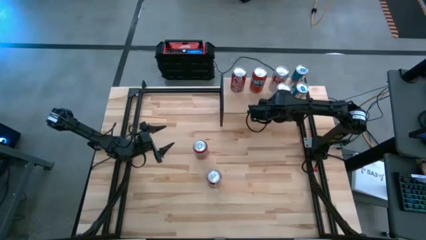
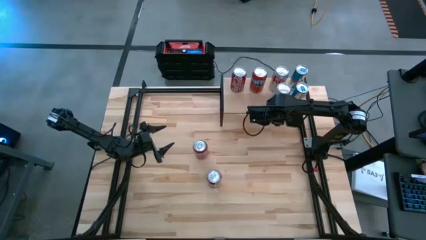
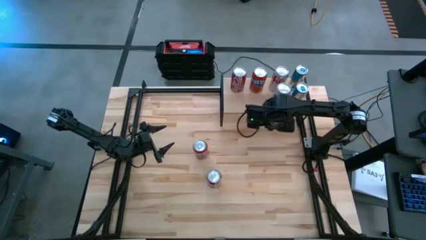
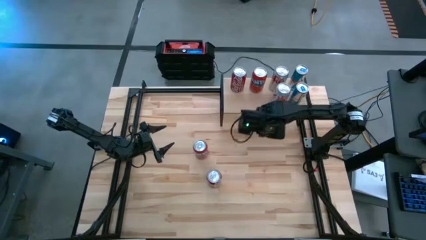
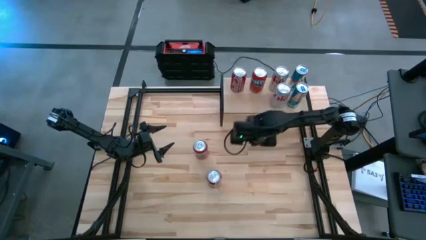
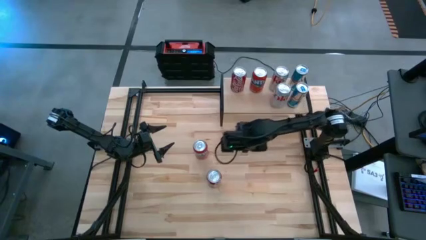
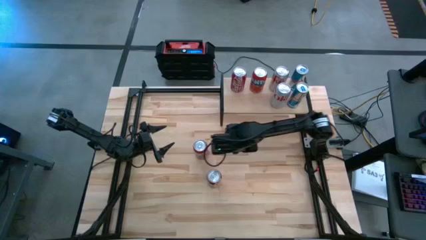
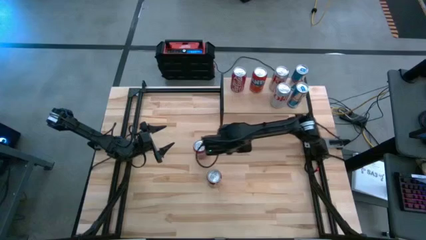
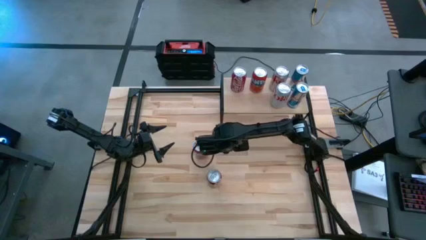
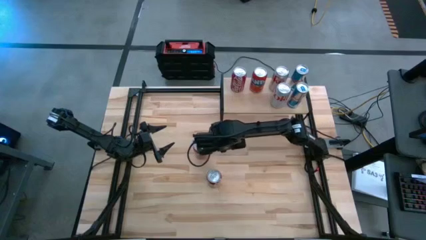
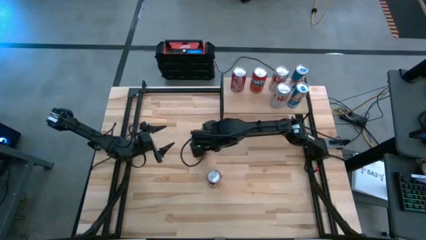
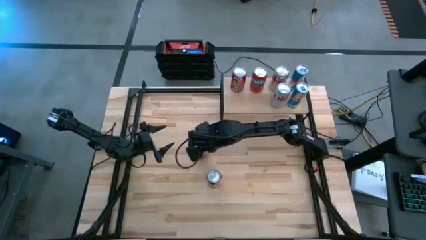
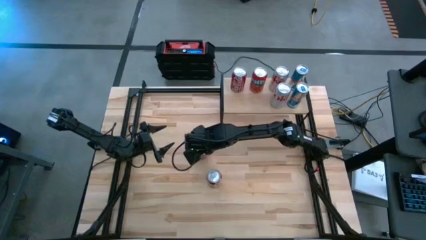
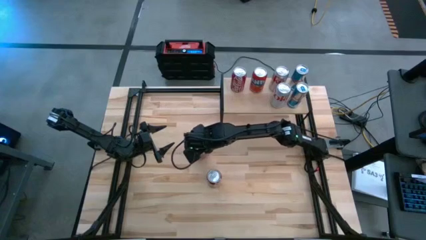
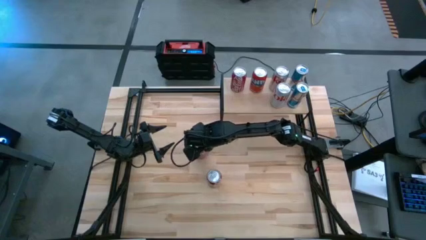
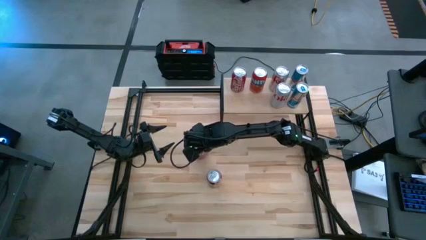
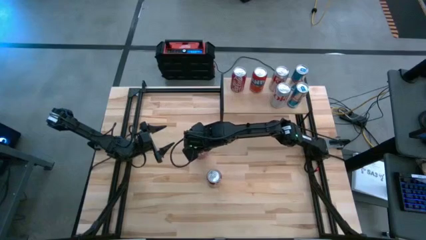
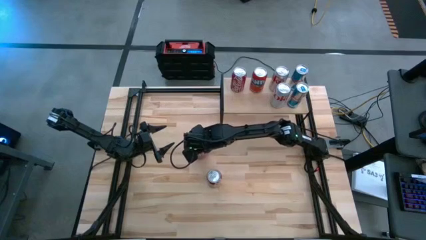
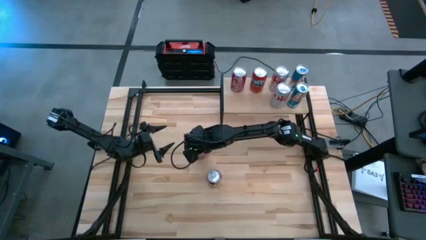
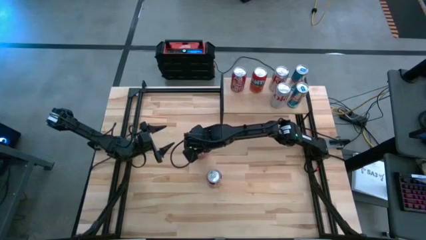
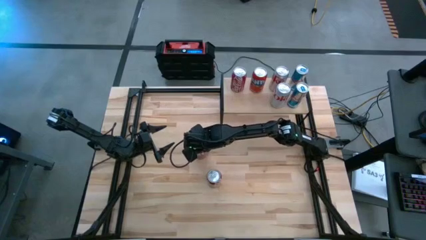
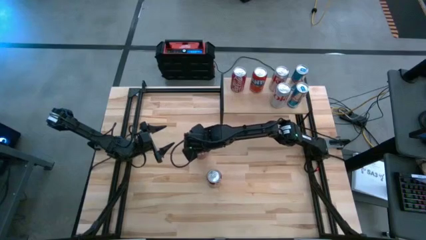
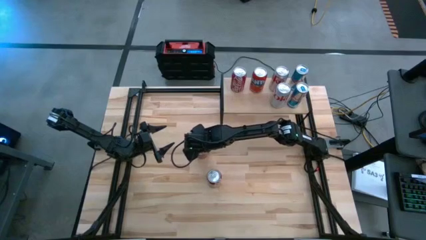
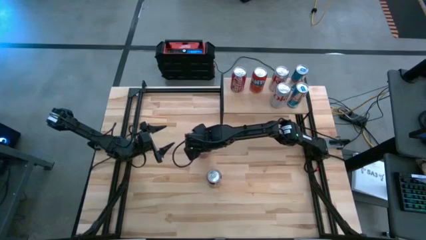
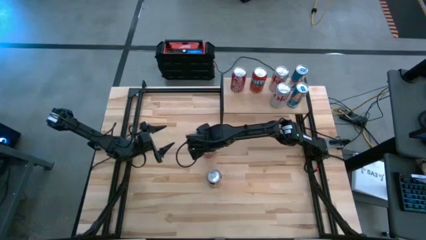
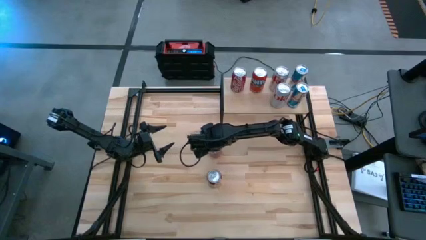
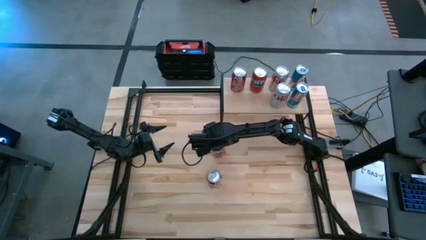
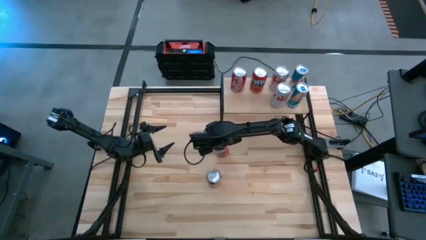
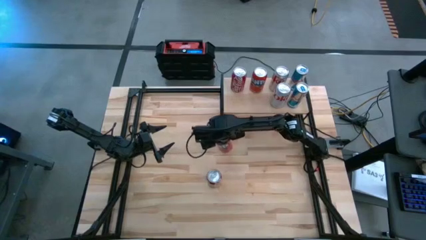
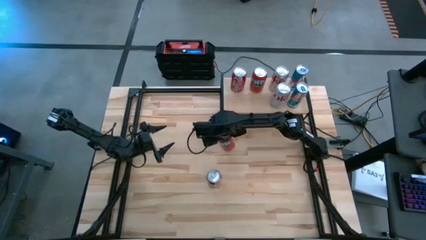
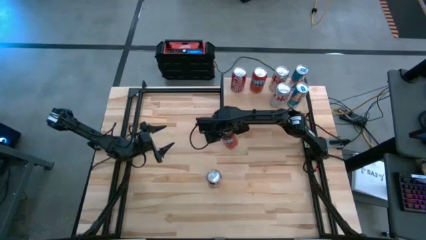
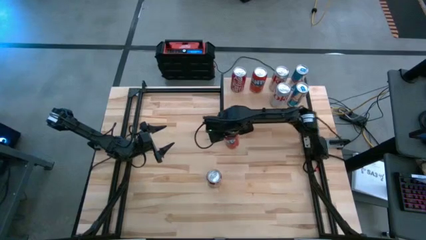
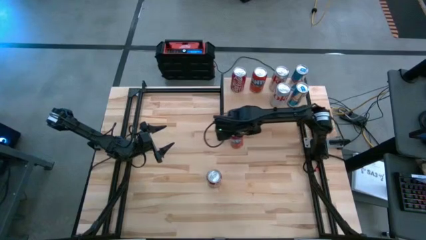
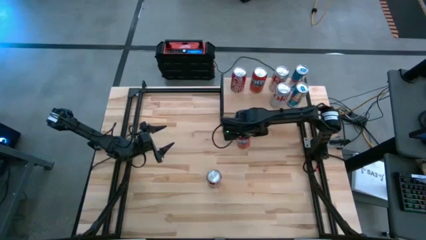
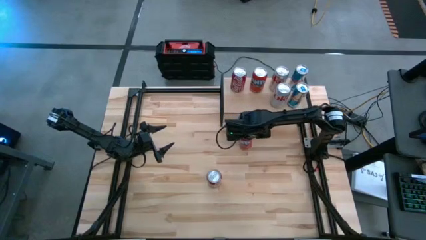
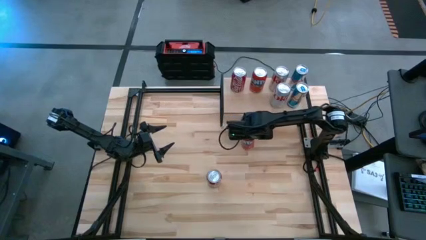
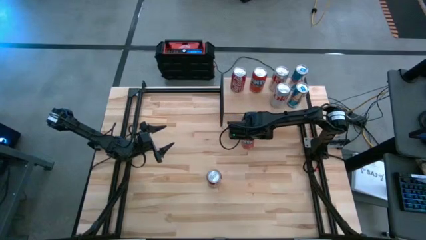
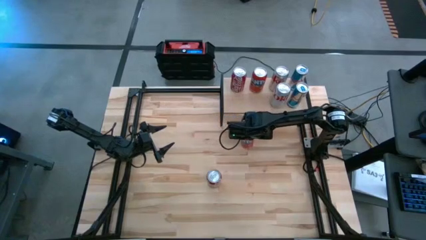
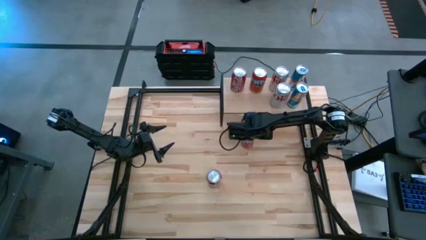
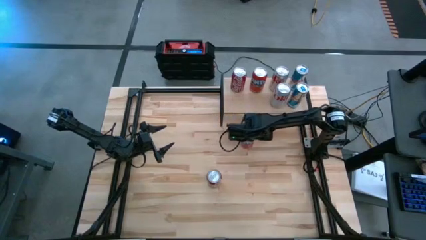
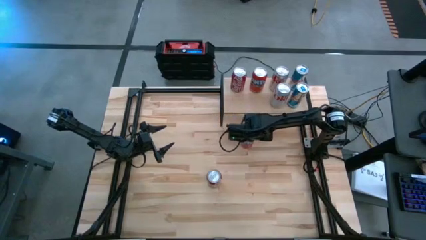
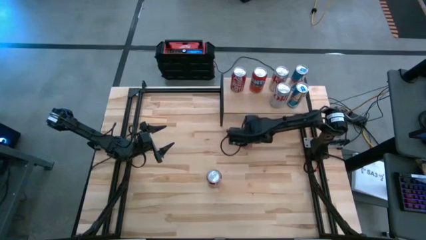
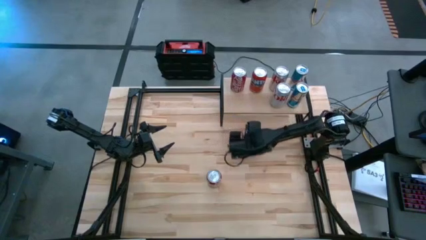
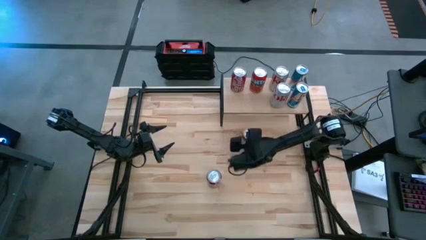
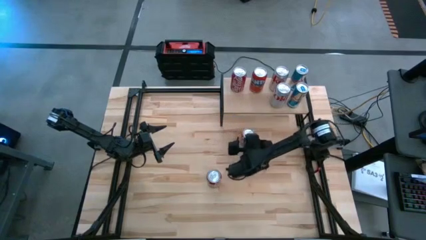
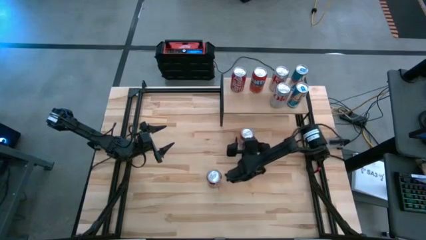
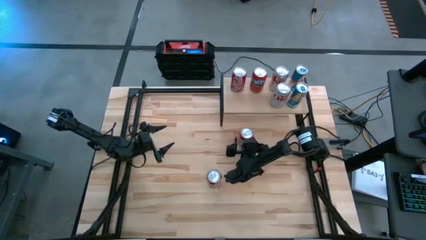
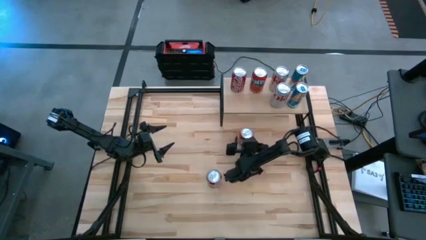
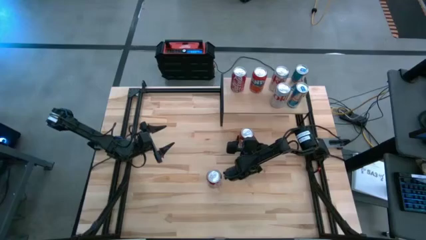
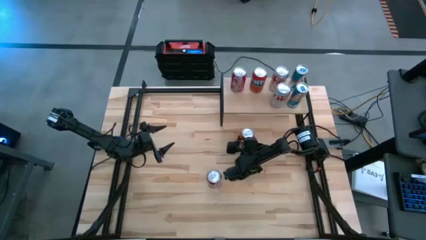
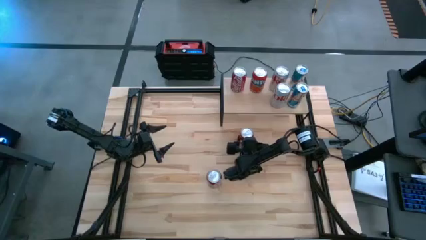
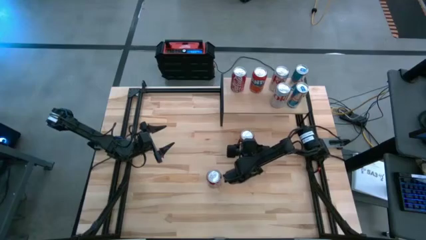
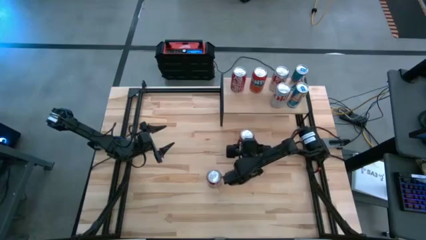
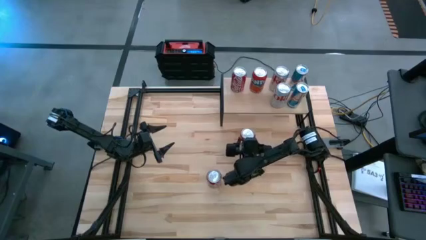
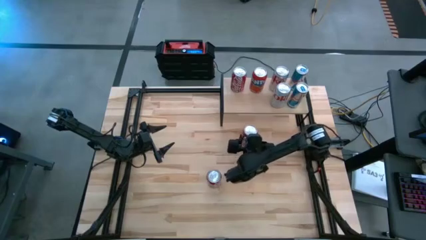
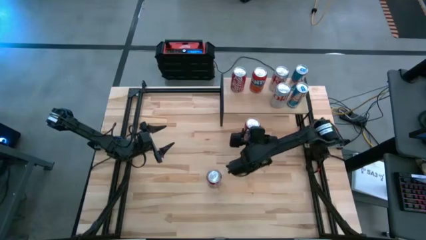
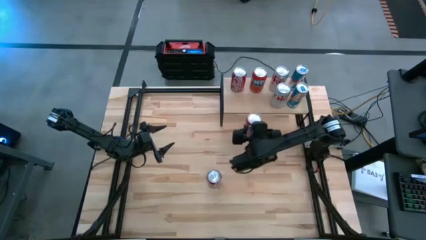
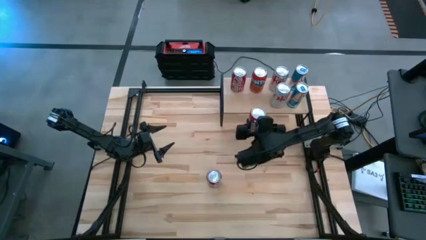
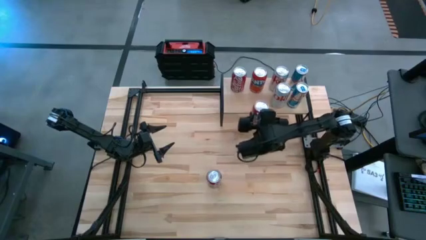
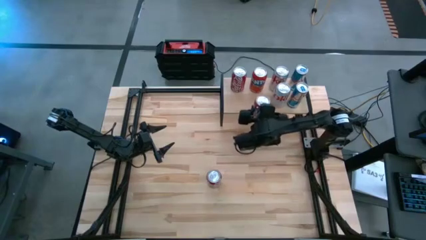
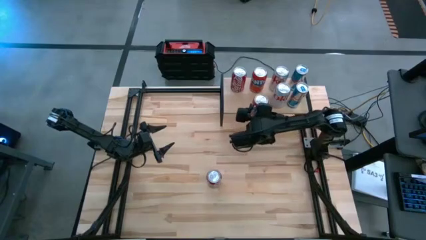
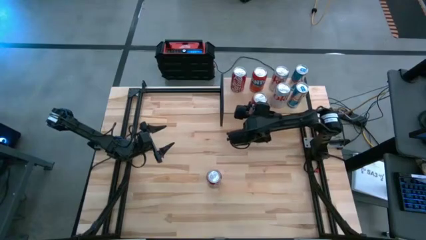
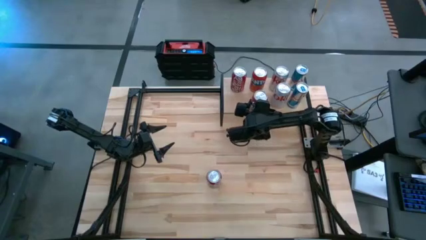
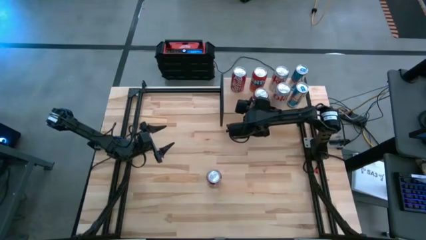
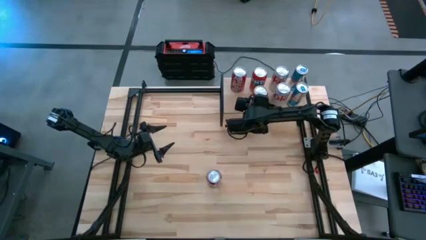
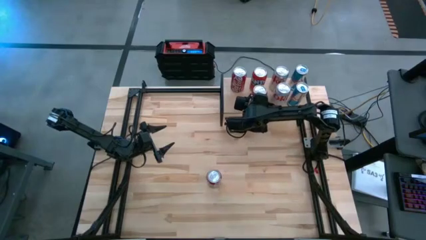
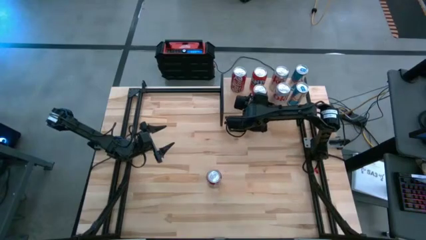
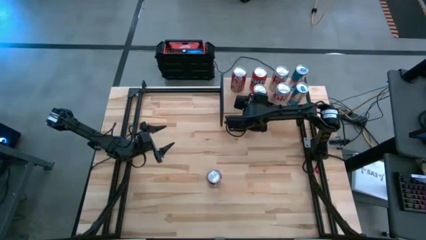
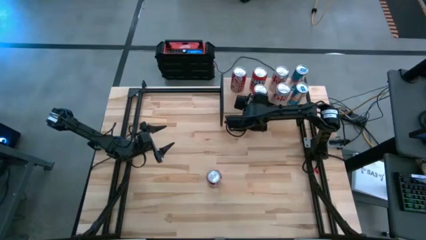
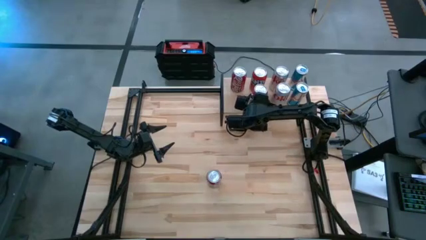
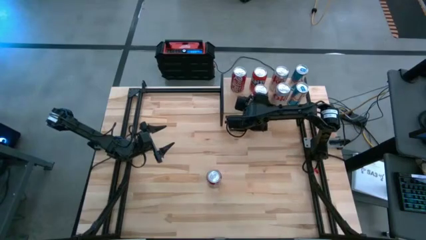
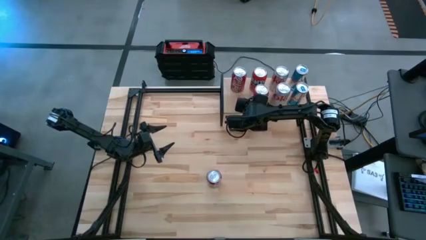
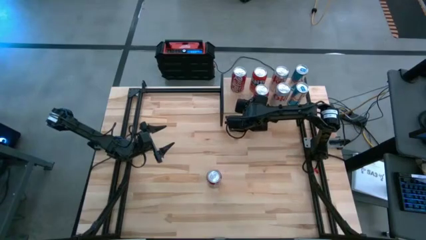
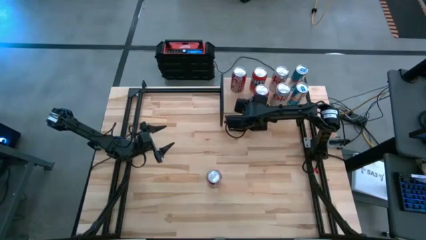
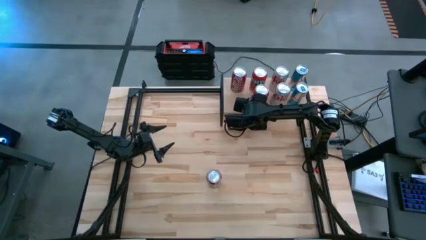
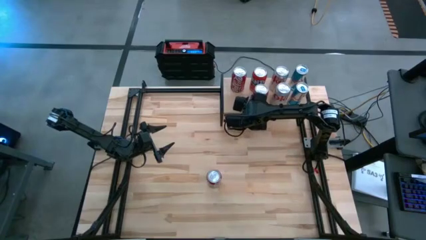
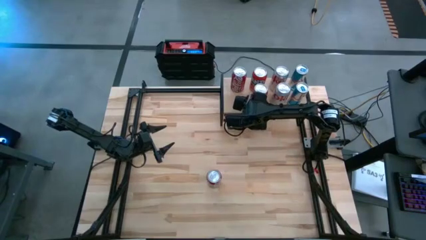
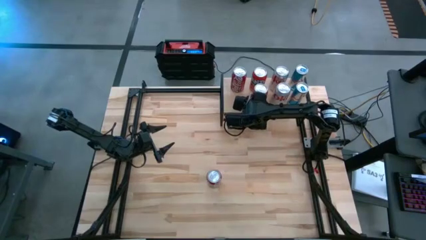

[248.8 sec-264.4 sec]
Task: Place canned beverage on shelf
Put the red soda can on the shelf aligned with the other red soda can

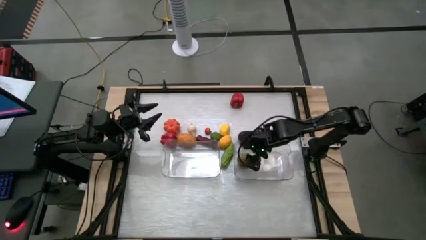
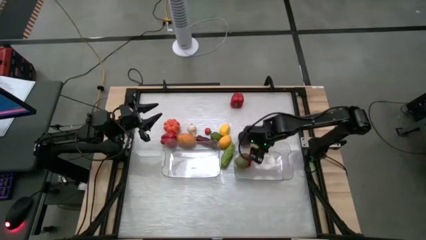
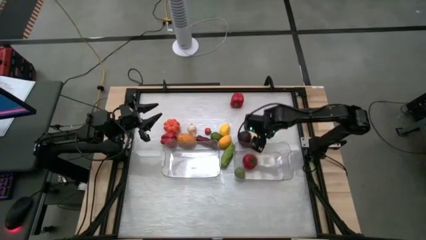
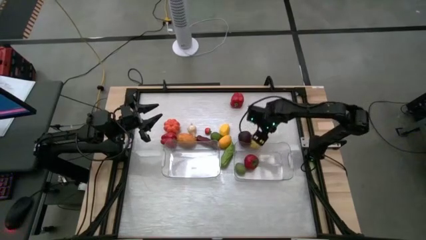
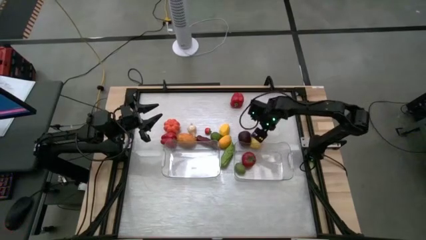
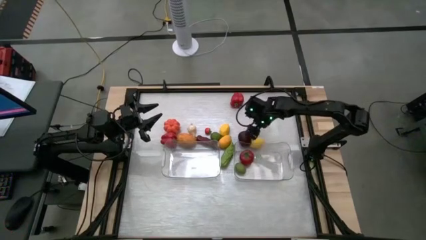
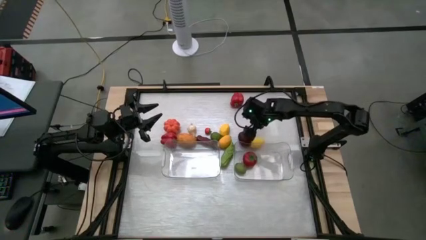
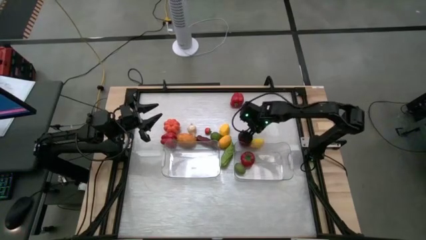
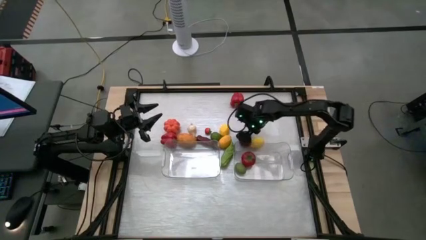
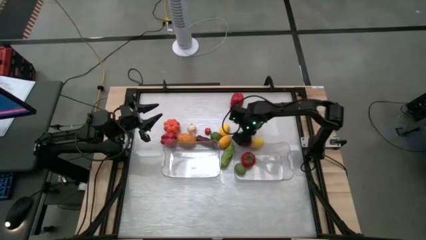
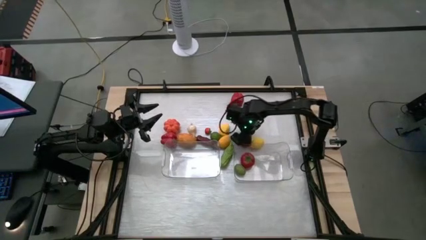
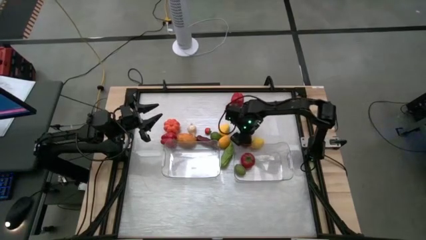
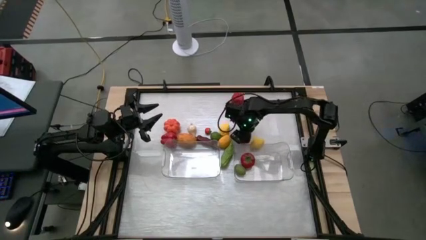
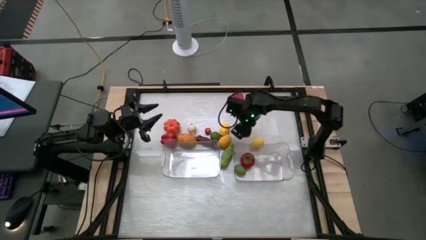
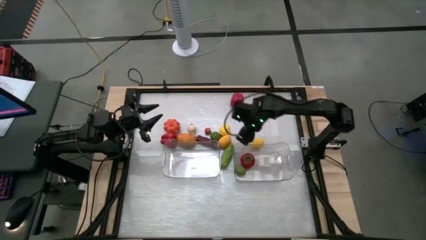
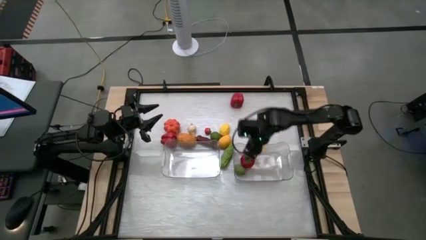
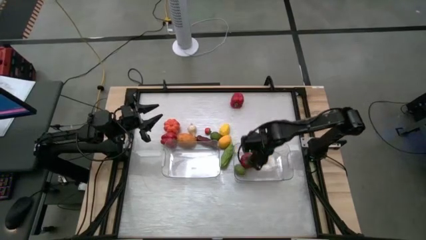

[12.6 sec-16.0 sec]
Task: Sort produce into baskets
Put the apple into the right transparent bin
